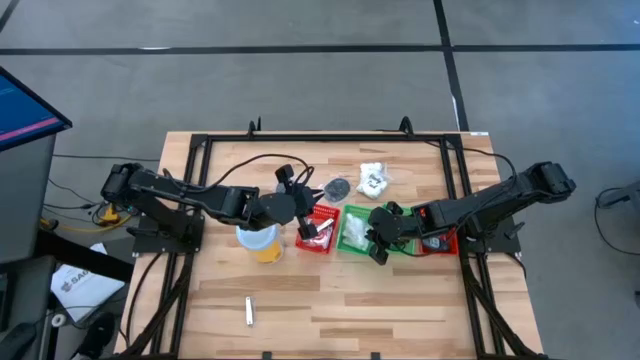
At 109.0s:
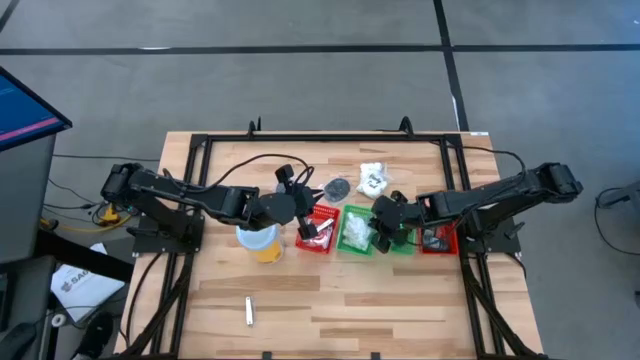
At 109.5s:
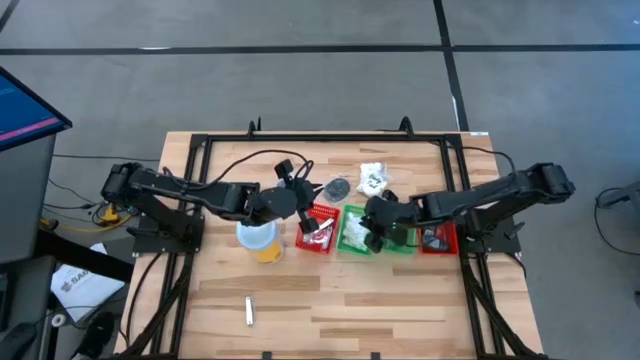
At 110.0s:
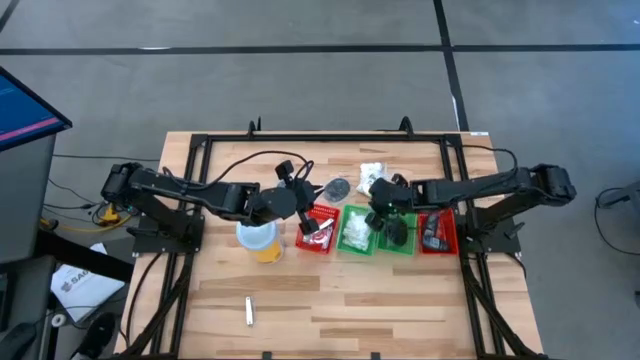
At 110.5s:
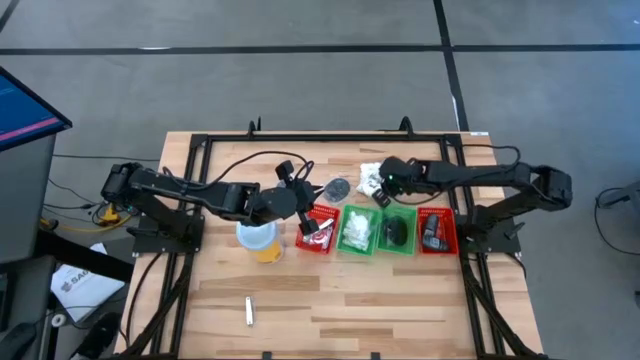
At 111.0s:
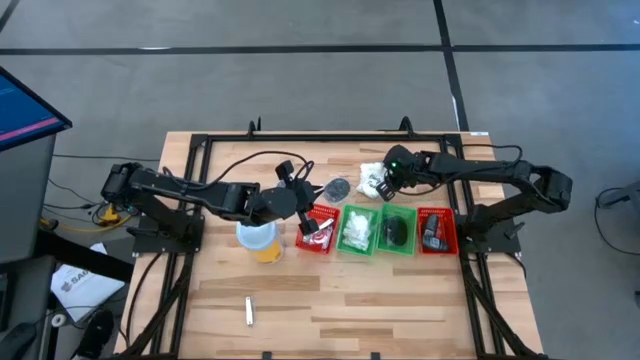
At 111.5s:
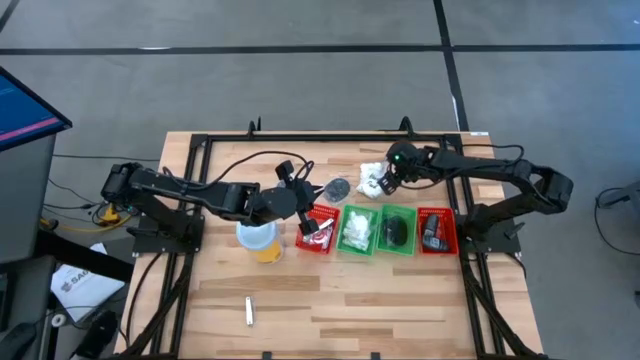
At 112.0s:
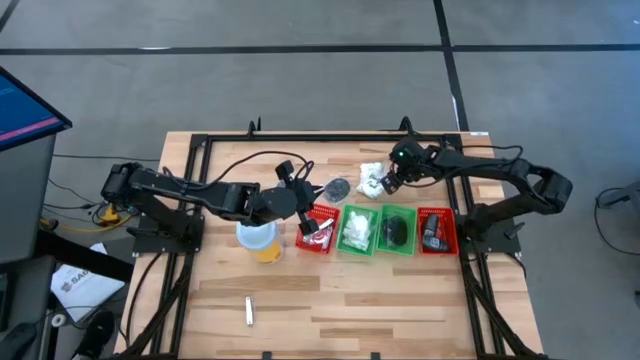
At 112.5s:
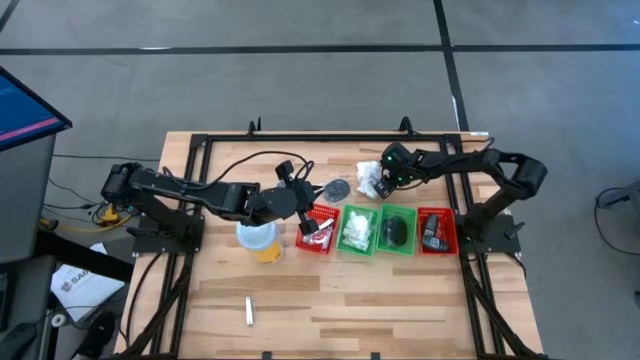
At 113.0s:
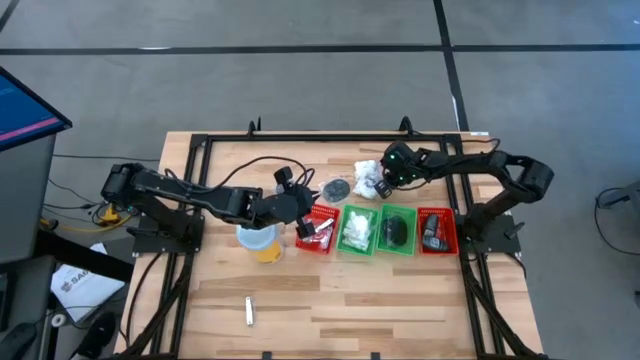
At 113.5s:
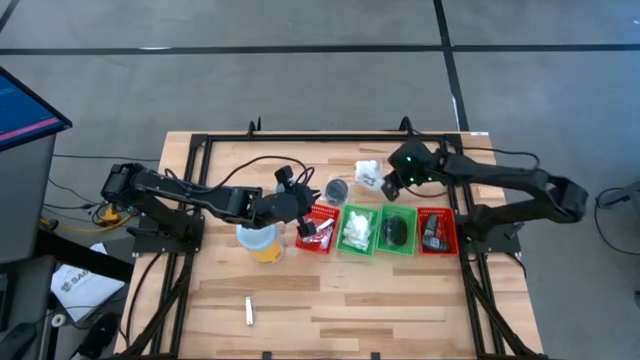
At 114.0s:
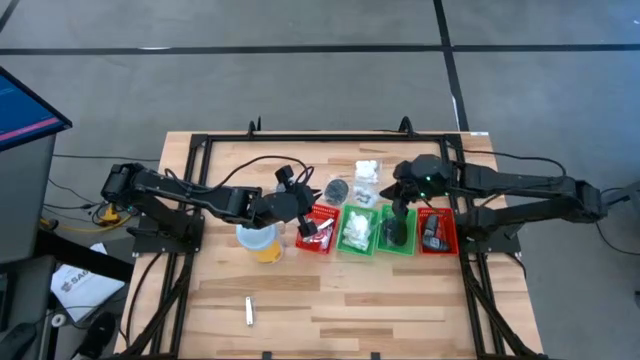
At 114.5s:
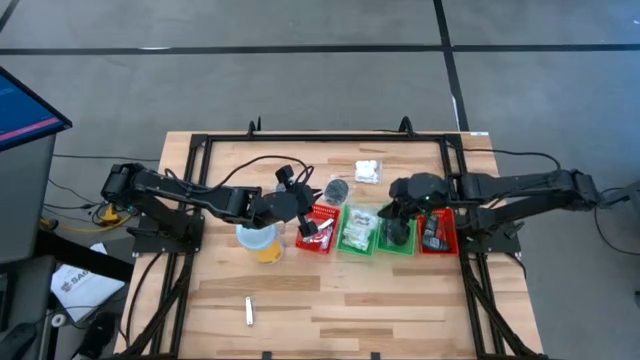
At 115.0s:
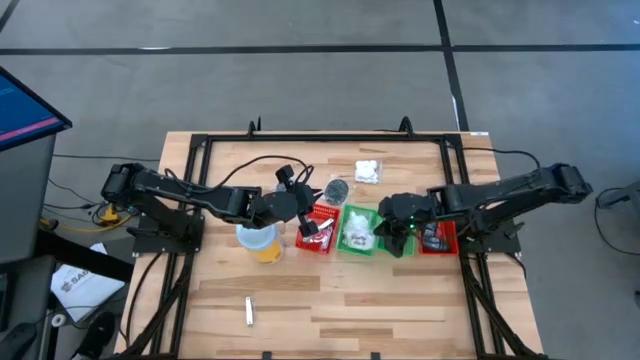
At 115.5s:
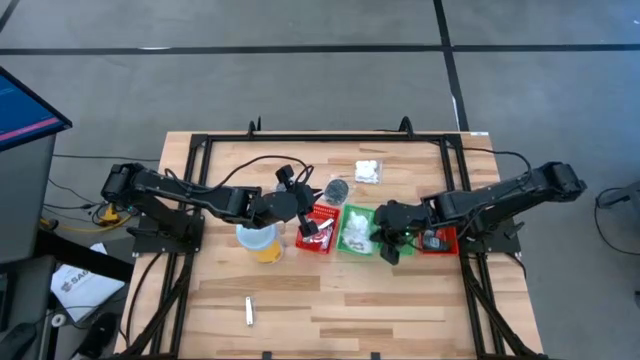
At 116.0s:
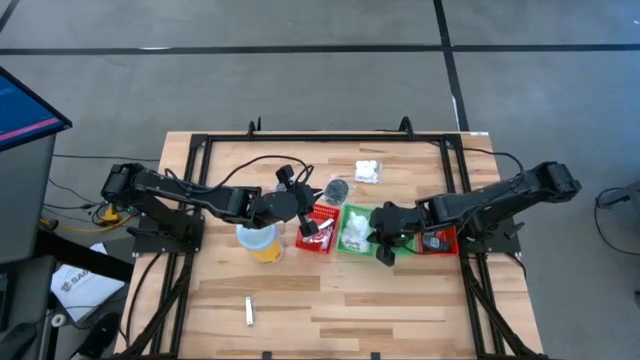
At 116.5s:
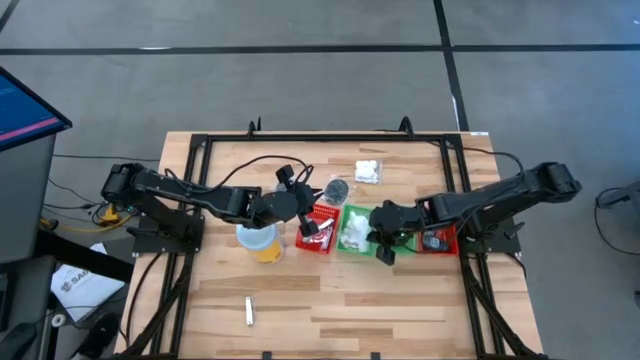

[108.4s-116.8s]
Task: Pick & Place Travel size toiletries
Put the white cotton pack into the left green bin

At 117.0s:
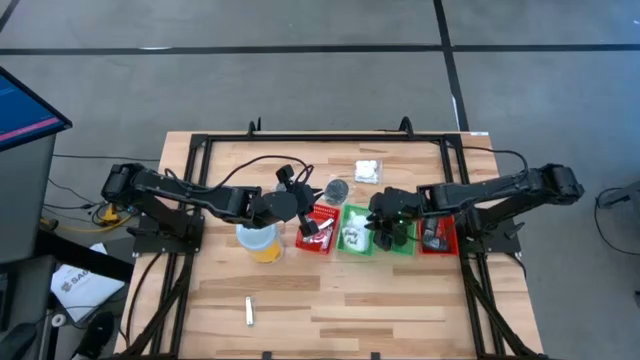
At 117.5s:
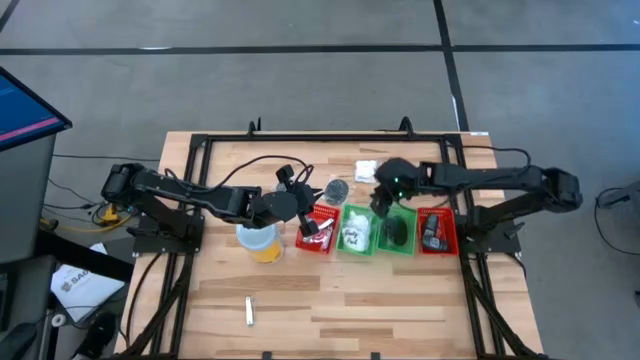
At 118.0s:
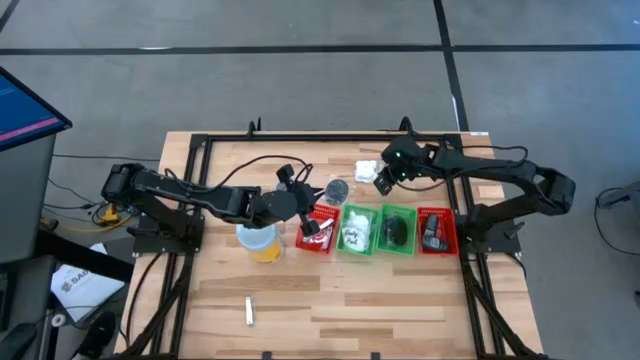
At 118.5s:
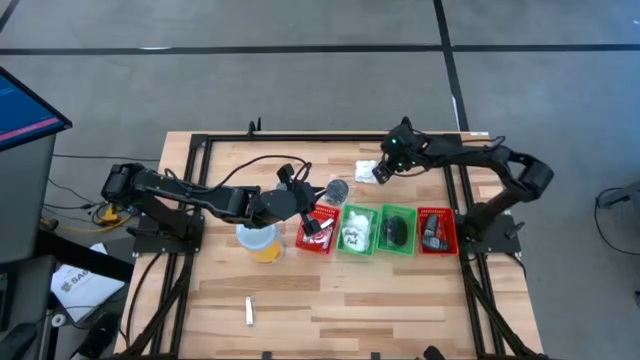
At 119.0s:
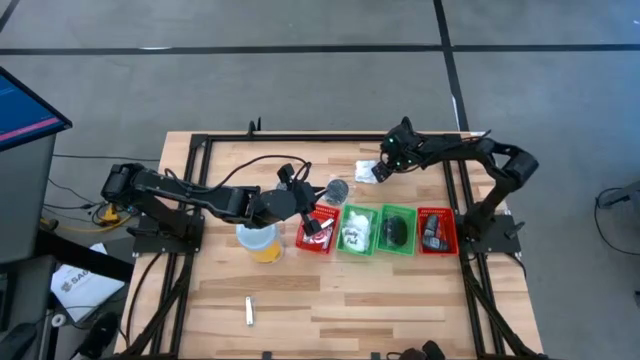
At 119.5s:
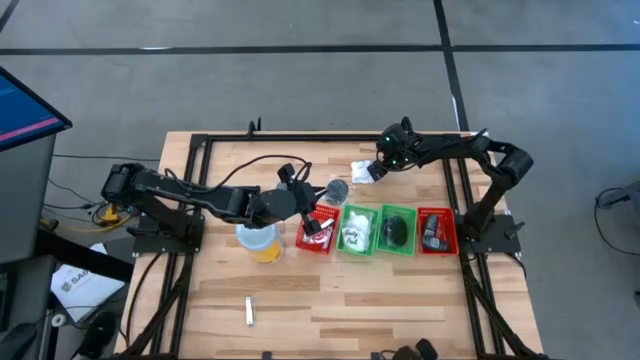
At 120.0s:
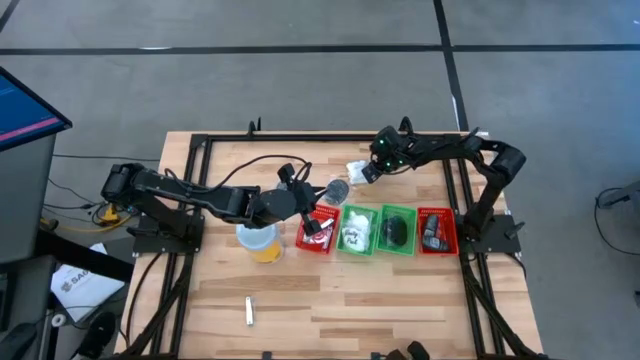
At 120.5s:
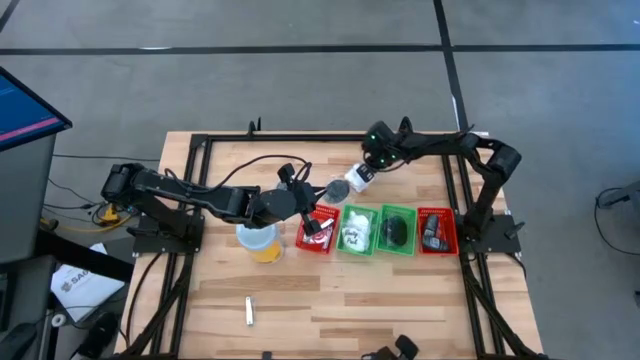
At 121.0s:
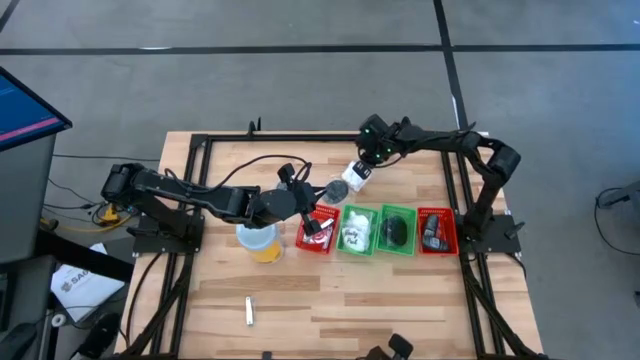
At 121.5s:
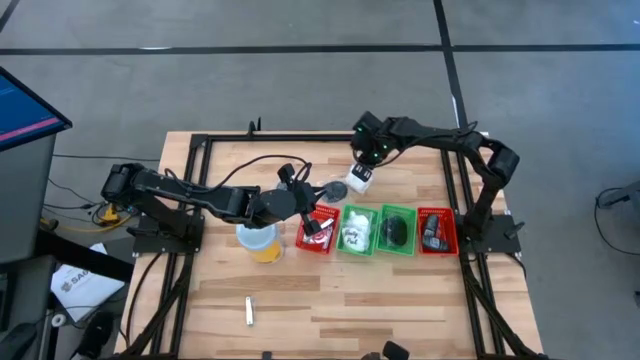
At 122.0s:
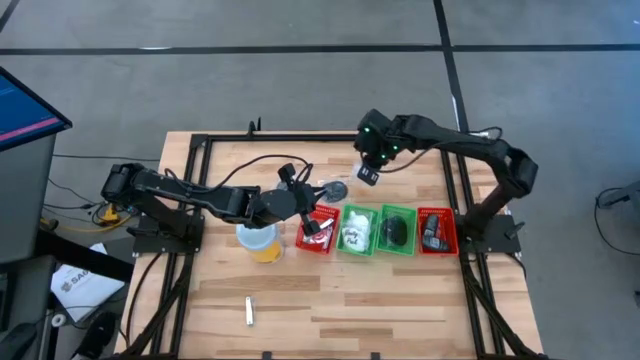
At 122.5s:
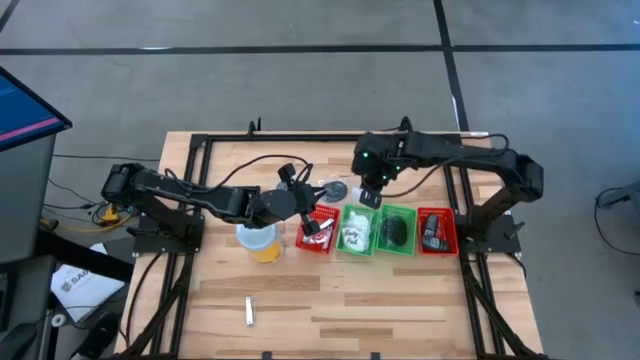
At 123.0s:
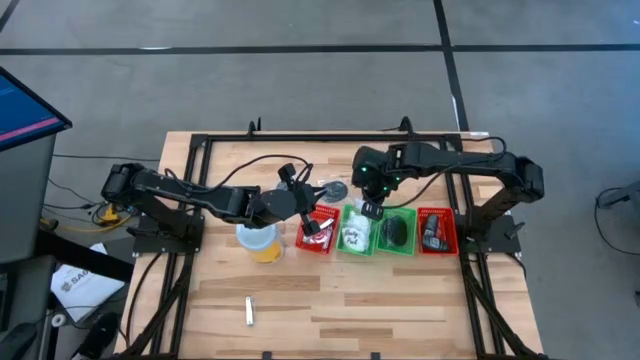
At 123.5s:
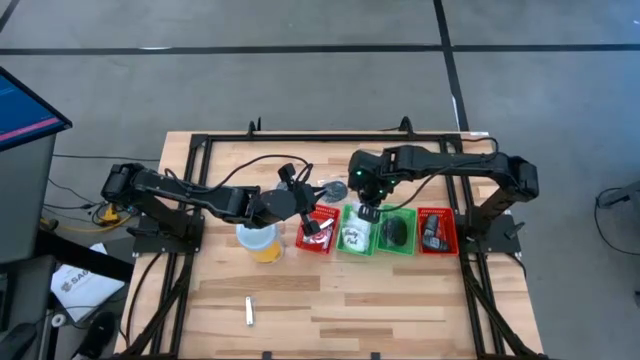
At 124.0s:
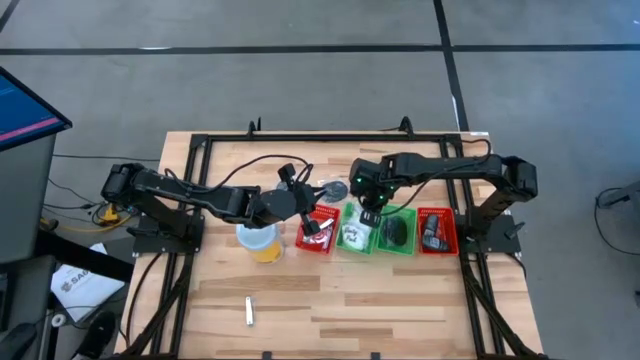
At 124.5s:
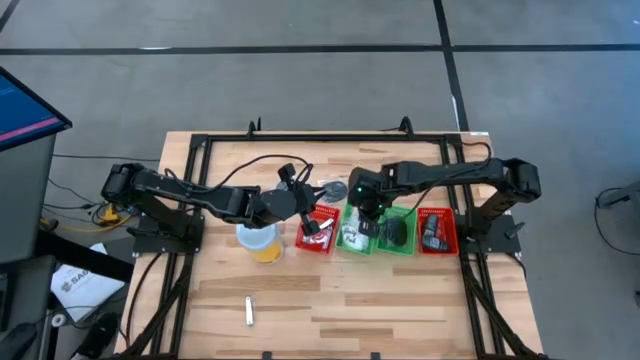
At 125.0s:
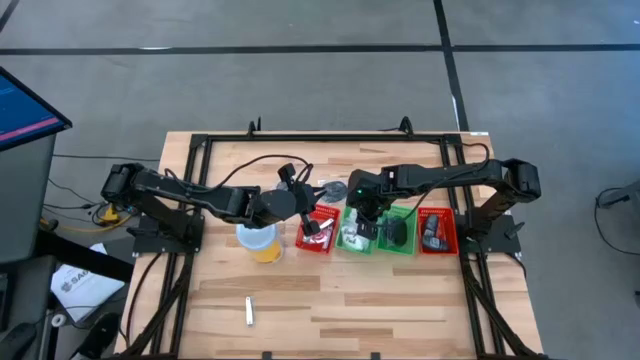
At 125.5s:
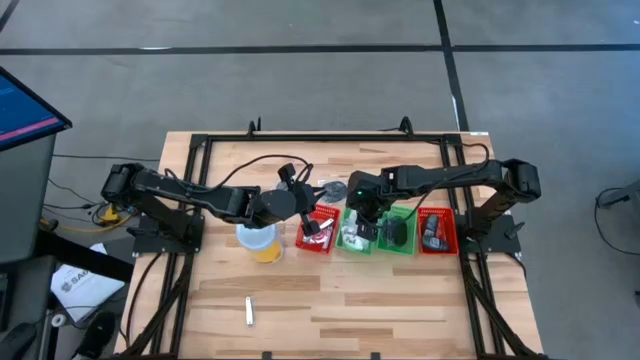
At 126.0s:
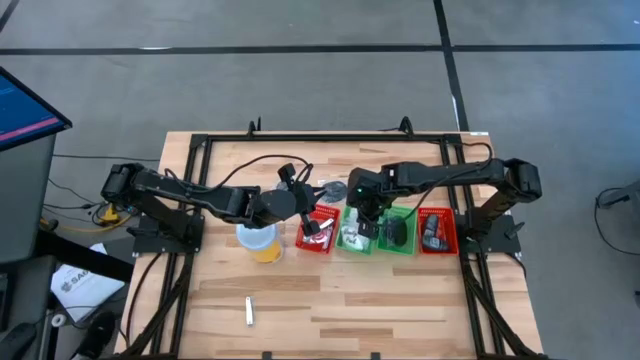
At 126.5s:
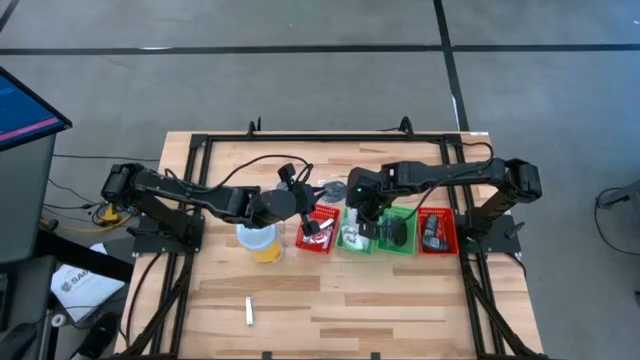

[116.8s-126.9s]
Put the white cotton pack into the left green bin

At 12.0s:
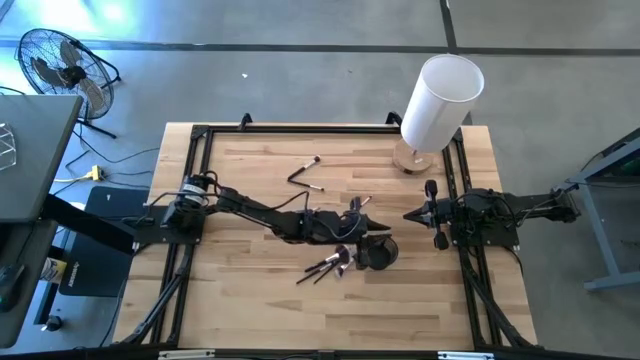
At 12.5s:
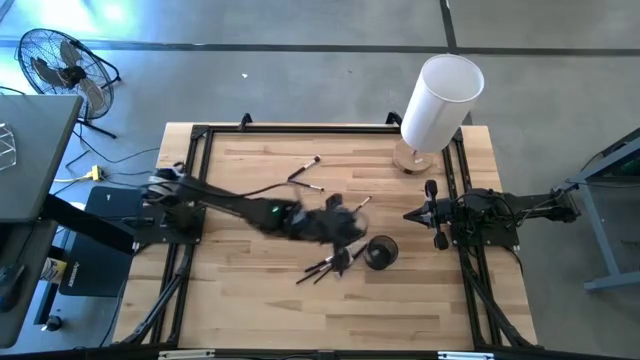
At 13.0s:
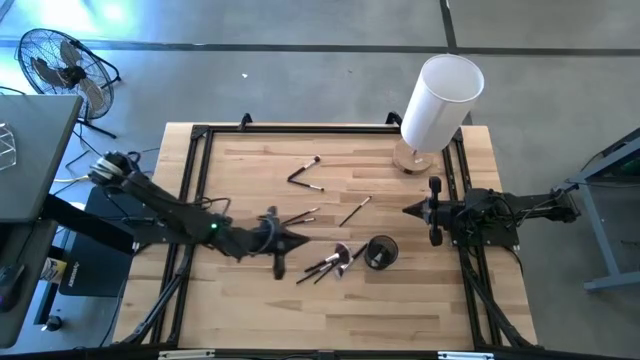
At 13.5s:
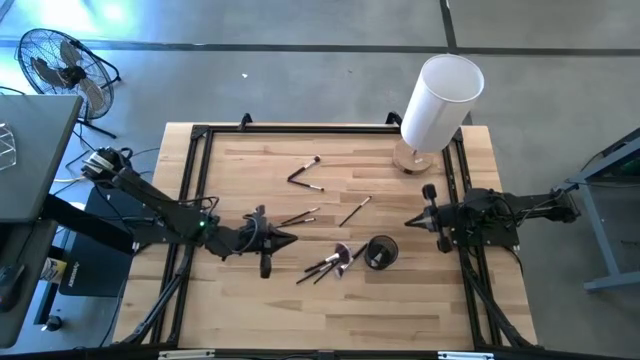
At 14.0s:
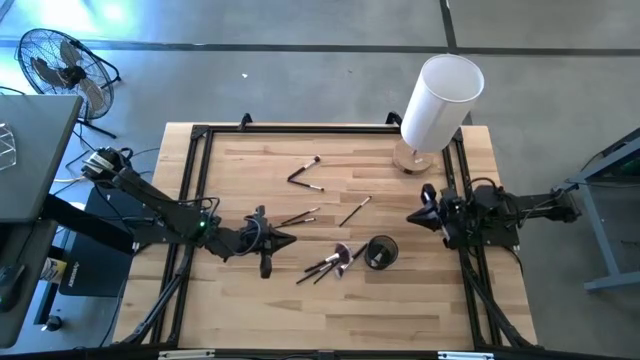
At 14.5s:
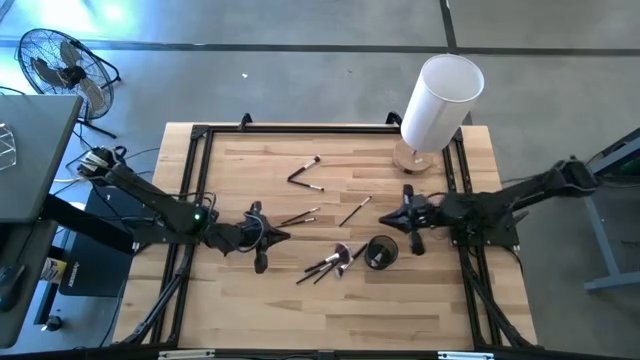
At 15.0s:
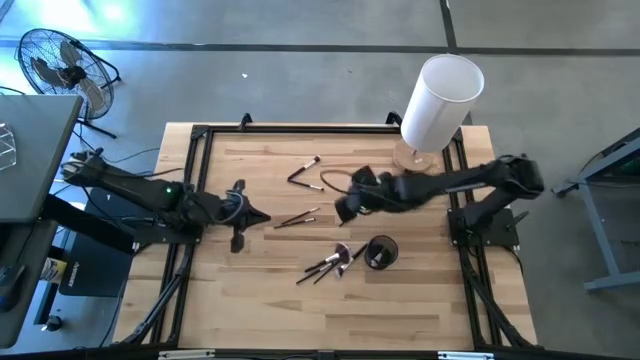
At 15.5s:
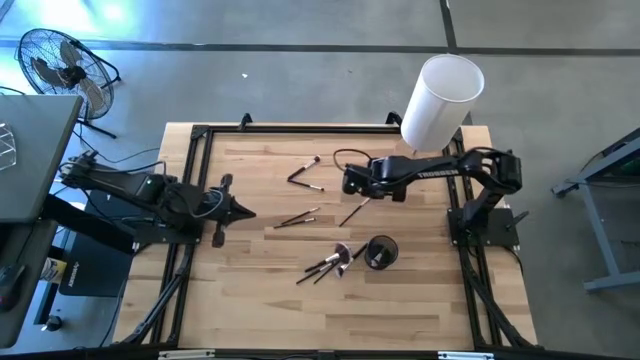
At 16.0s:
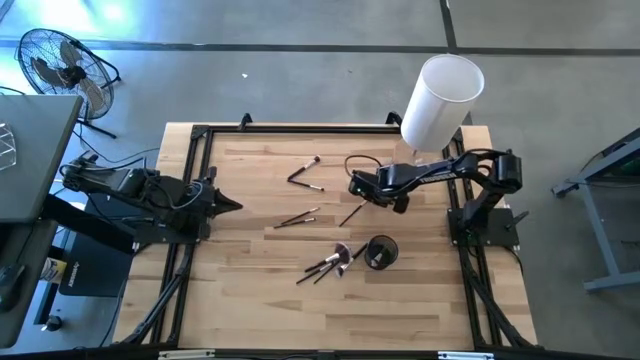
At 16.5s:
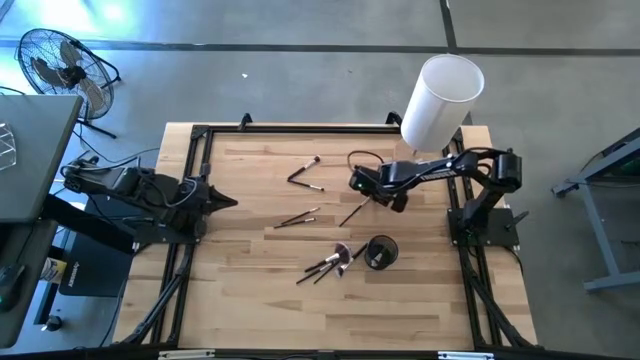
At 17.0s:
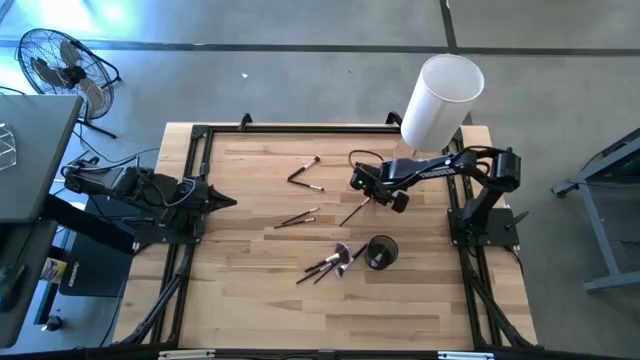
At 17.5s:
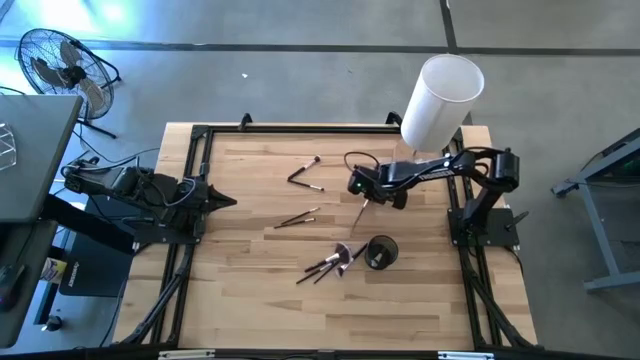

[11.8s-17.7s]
Task: Put items in baskets/containers
Put the eyeshadow brush into the mesh organizer
